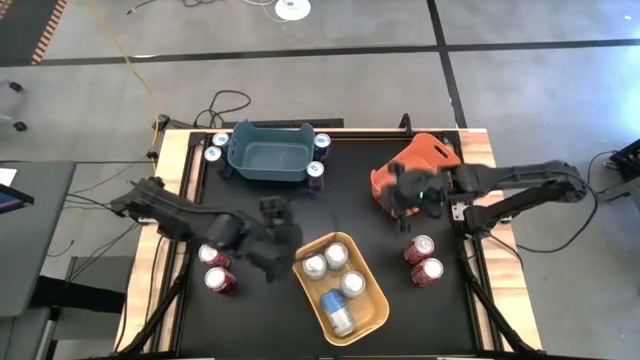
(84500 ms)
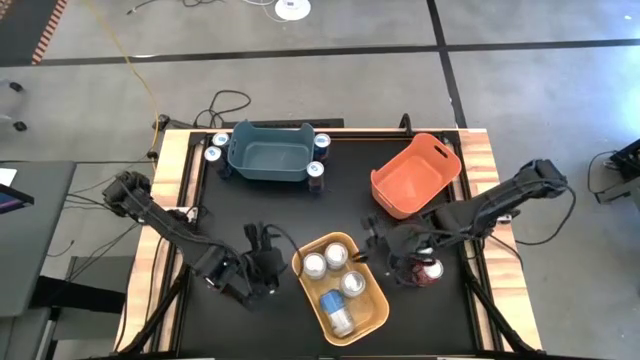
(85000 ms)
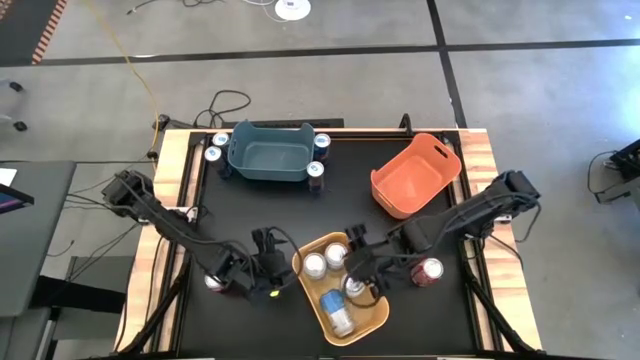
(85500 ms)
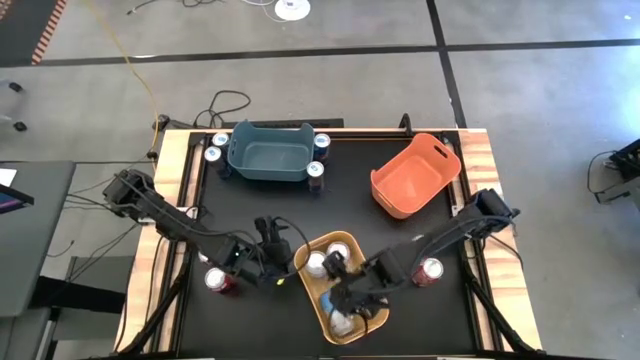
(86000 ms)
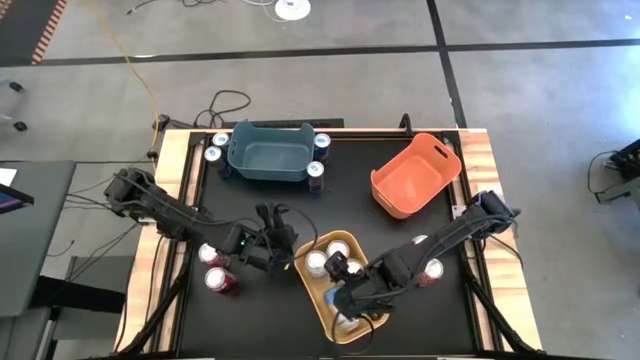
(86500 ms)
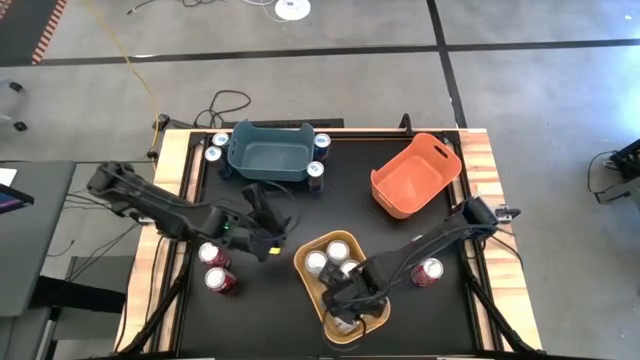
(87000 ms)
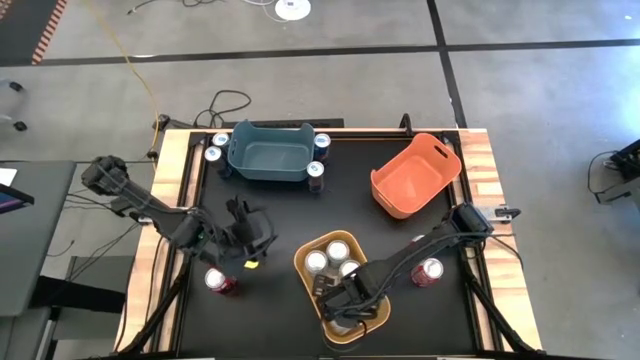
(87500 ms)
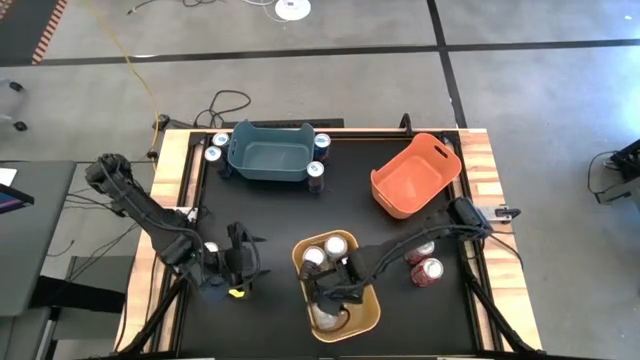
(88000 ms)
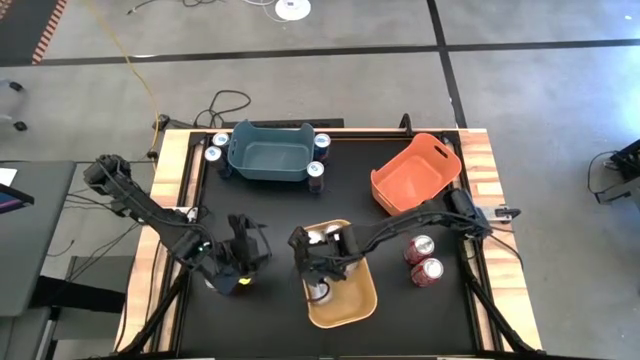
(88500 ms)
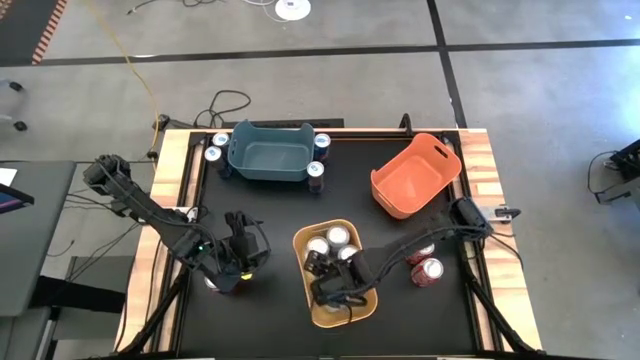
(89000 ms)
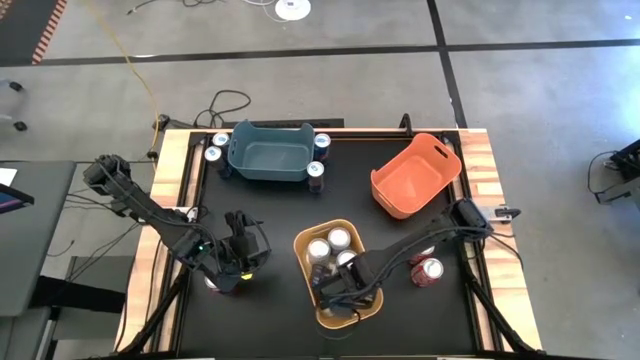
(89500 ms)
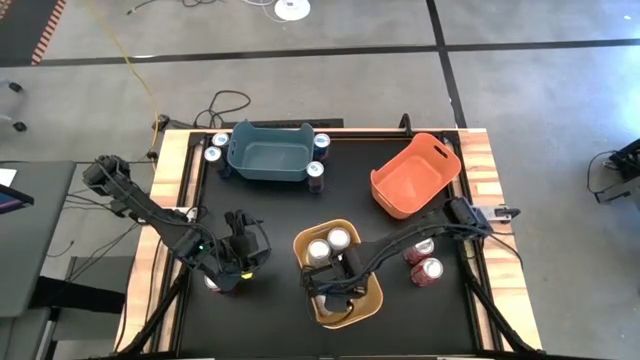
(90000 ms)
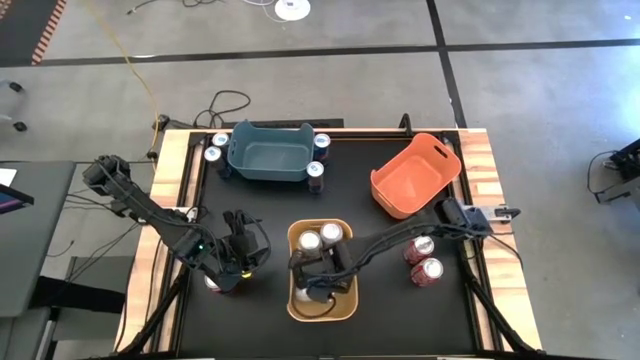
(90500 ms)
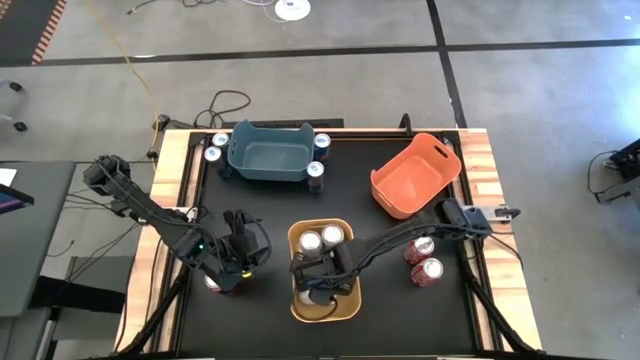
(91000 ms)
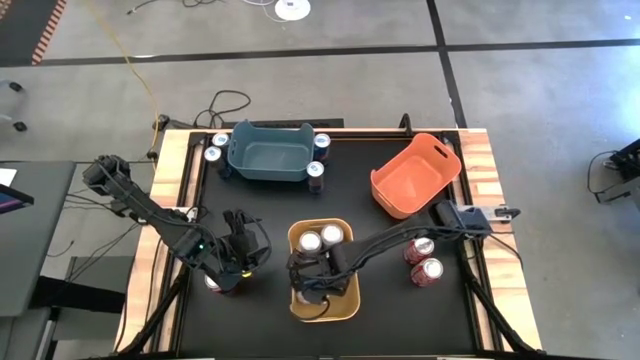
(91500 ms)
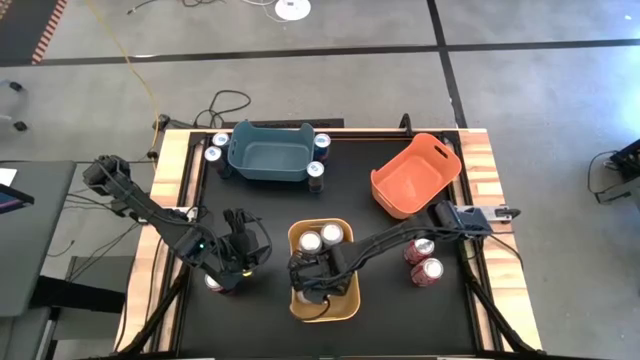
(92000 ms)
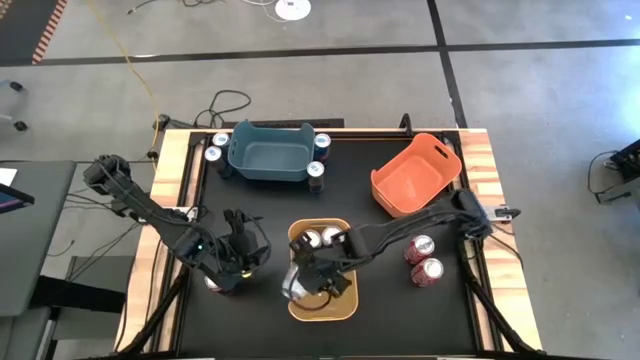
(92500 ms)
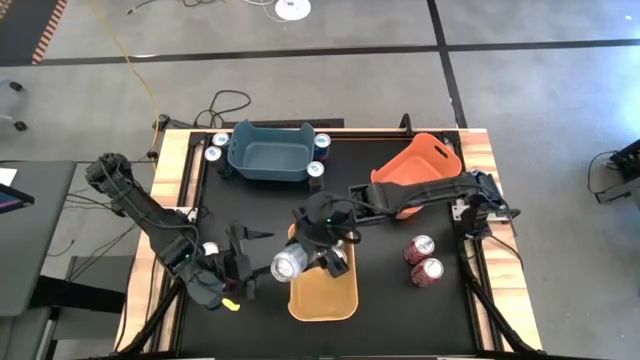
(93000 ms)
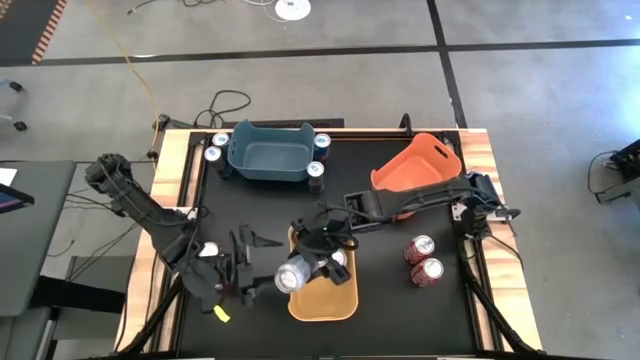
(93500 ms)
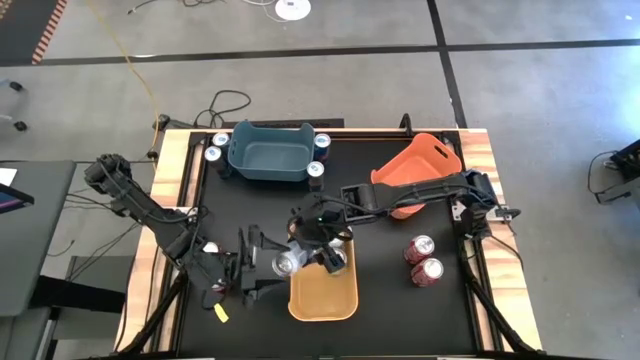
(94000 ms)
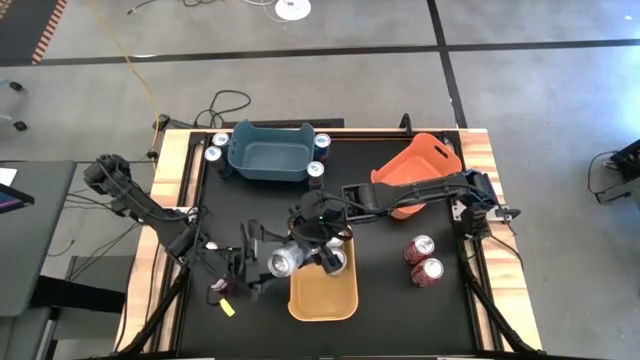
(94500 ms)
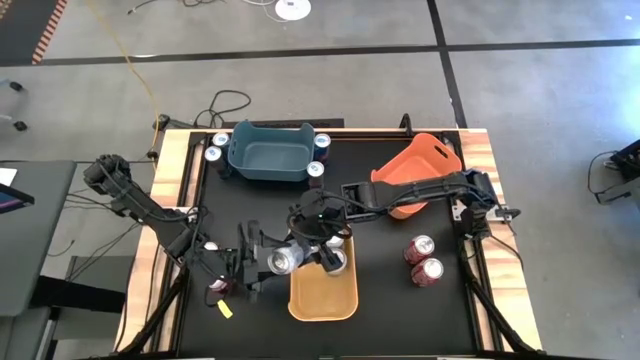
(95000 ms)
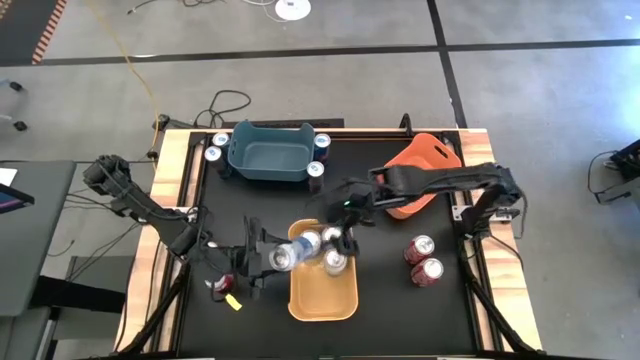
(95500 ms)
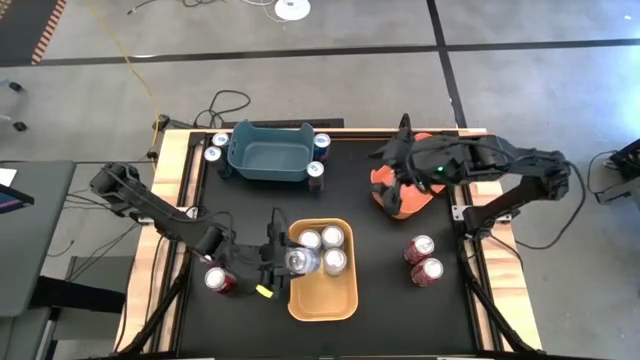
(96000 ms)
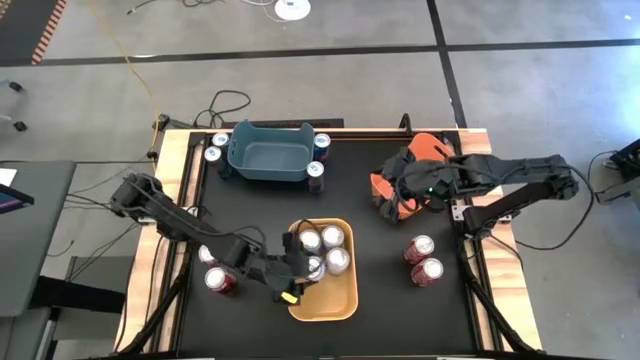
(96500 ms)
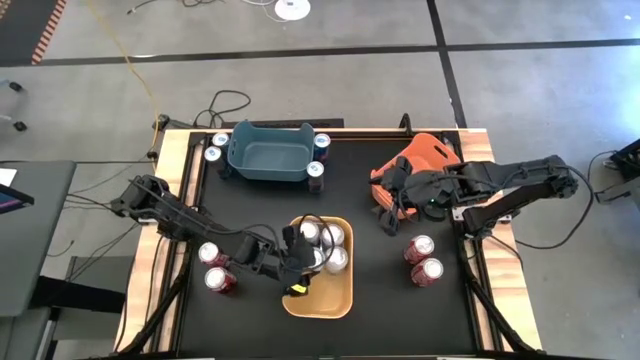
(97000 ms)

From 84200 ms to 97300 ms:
Task: Sort soda cans
Adjust the blue white soda can in the yellow bin

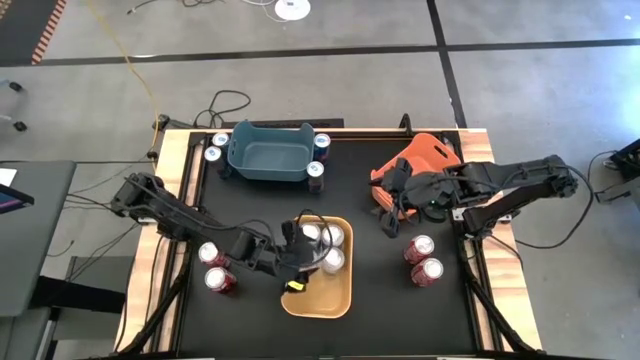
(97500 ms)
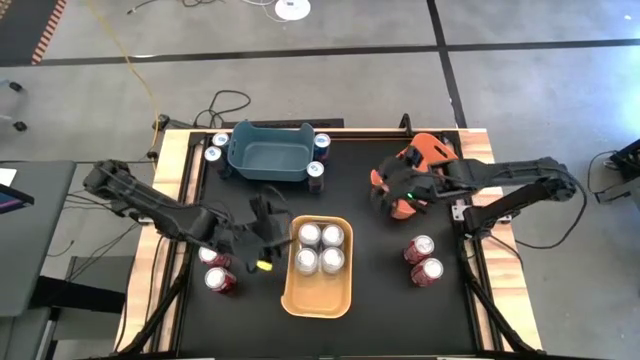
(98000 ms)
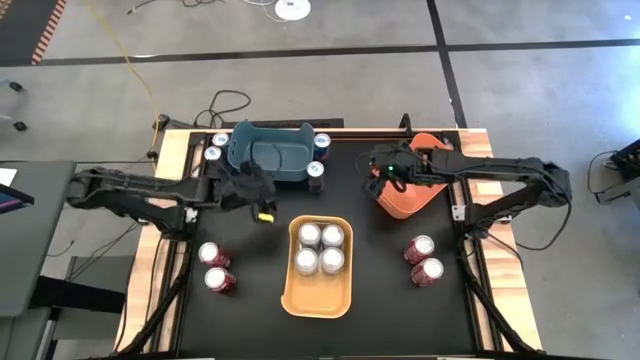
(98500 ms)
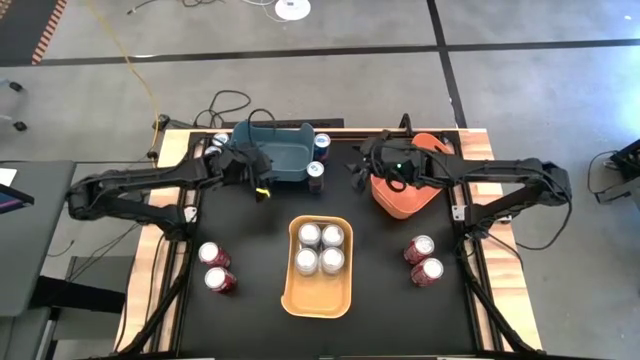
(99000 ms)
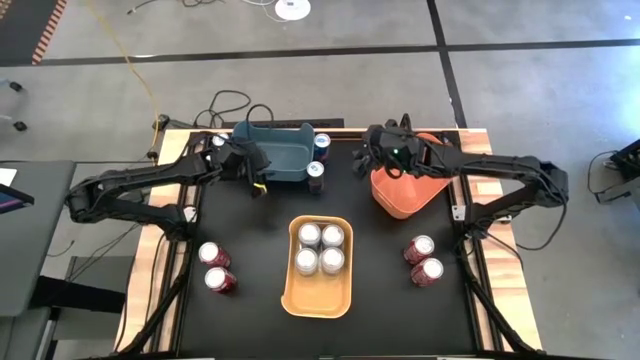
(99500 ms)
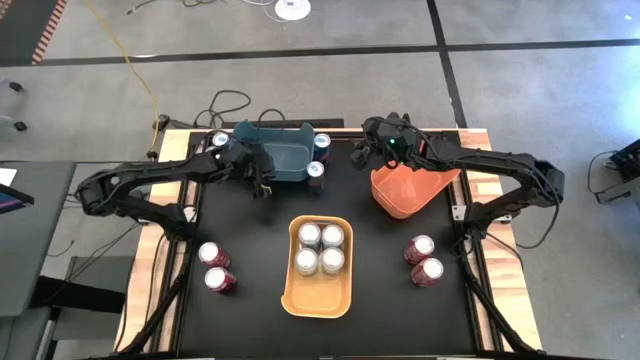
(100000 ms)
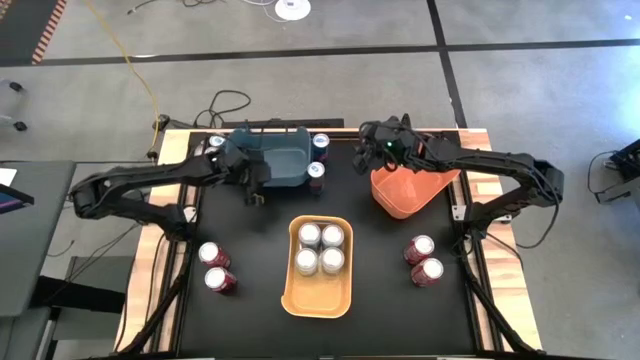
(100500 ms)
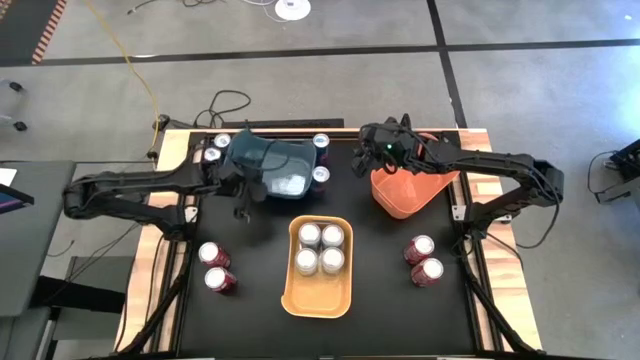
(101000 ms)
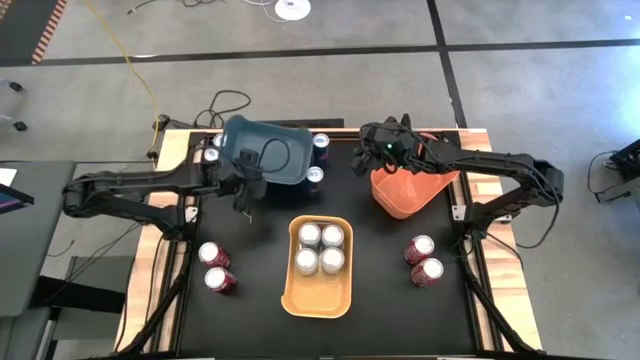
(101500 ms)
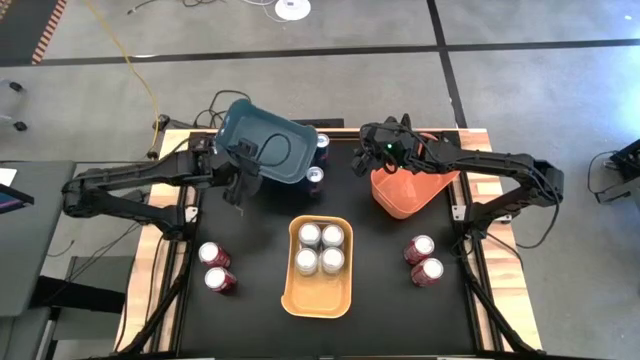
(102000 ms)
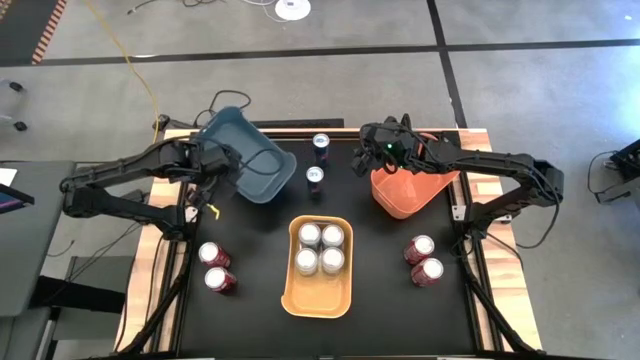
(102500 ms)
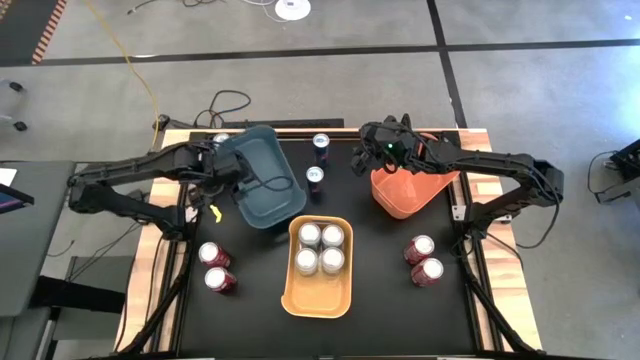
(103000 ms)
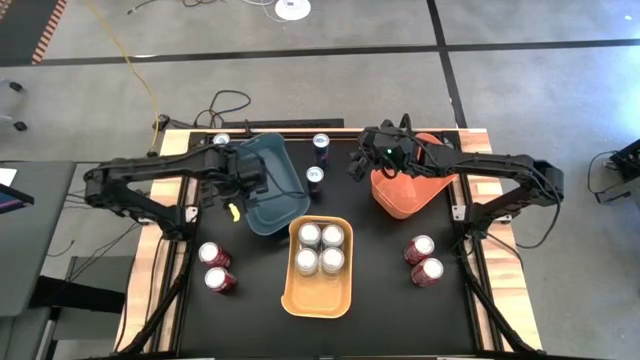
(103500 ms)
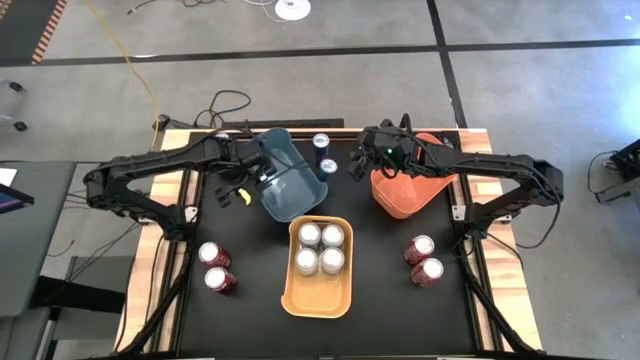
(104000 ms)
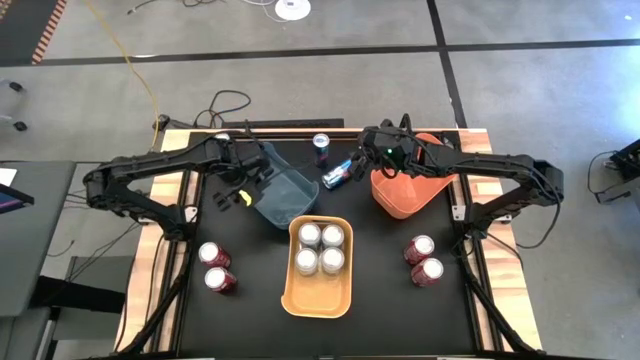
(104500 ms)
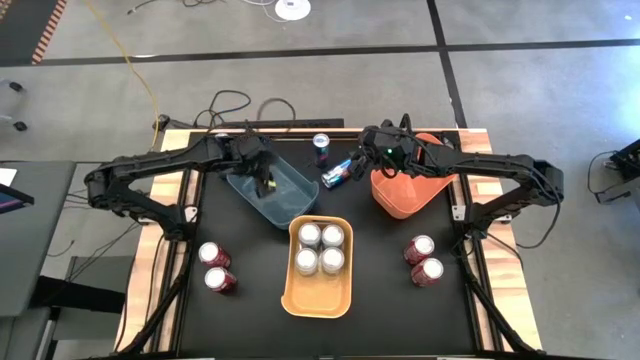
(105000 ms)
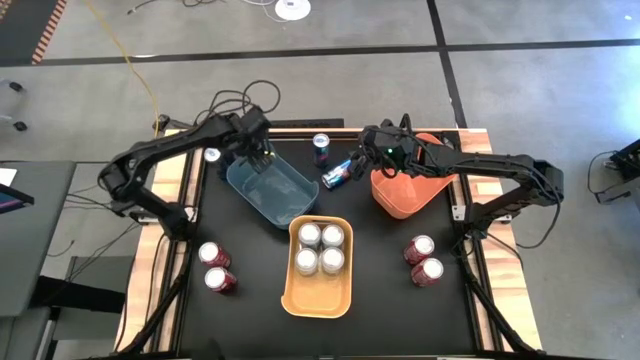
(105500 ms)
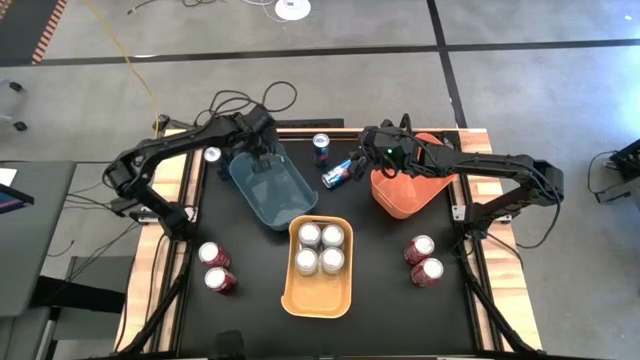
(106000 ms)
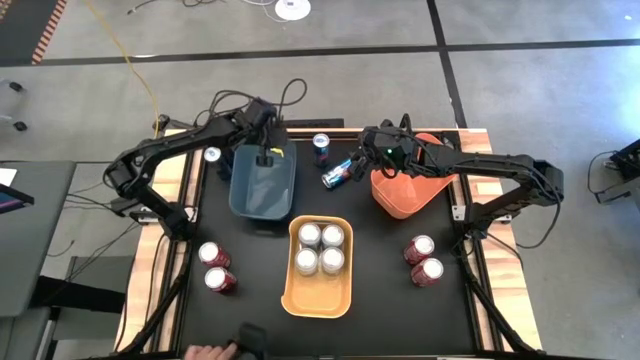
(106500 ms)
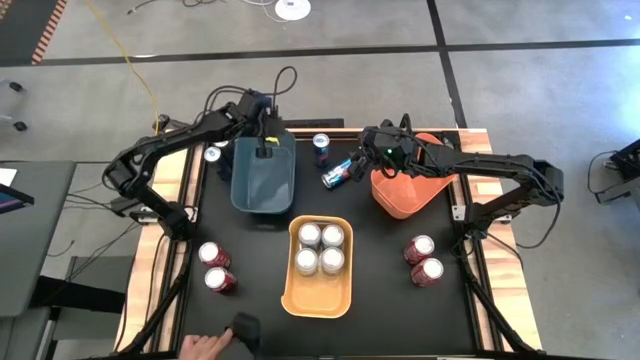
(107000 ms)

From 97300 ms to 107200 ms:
Adjust the blue bin
